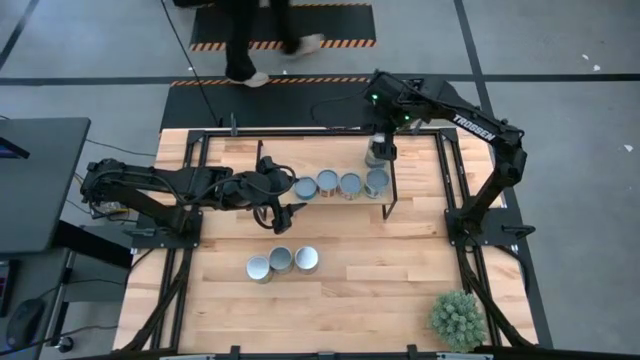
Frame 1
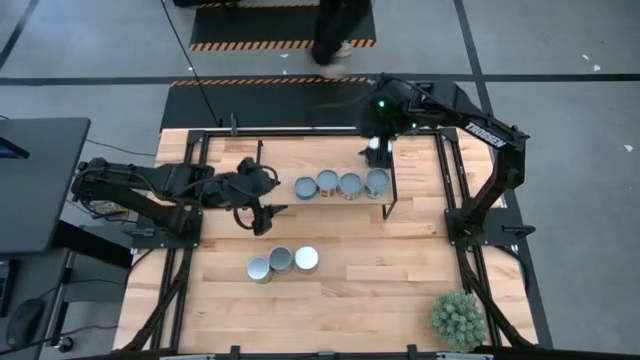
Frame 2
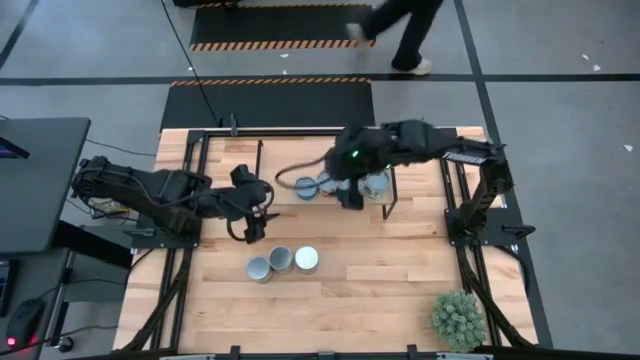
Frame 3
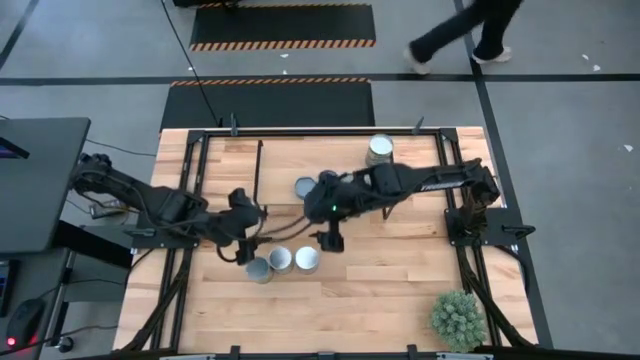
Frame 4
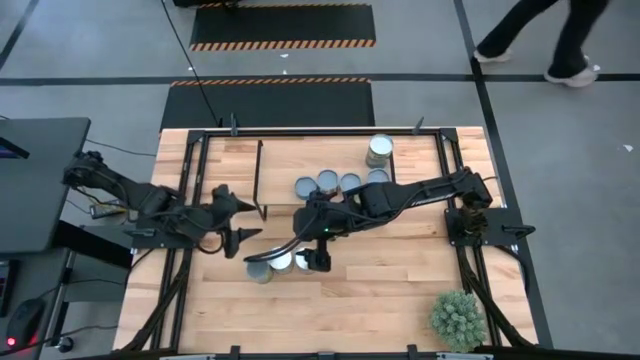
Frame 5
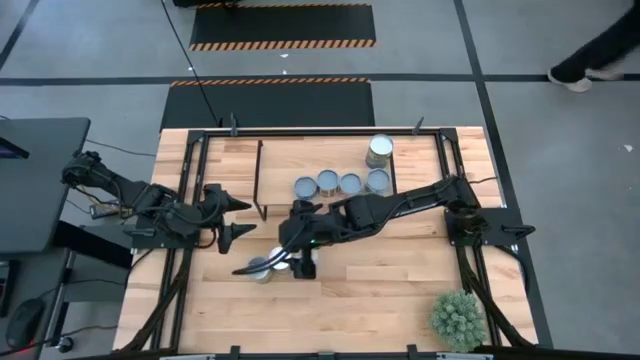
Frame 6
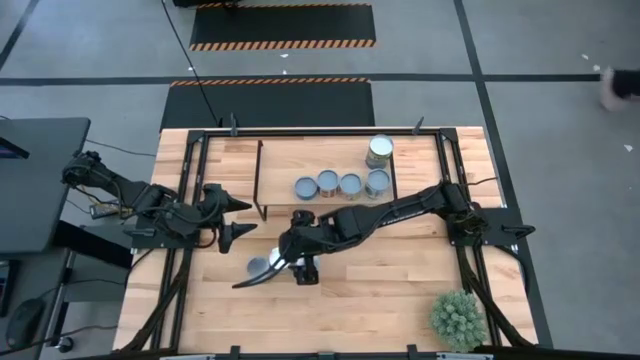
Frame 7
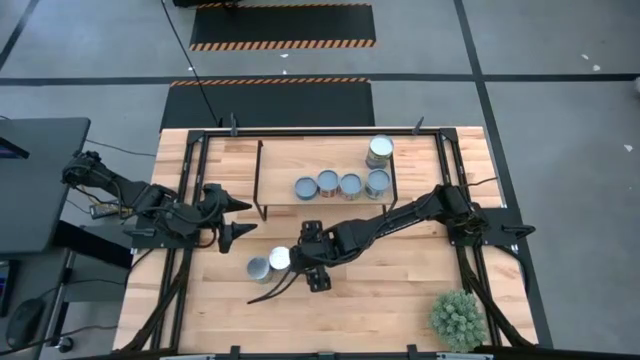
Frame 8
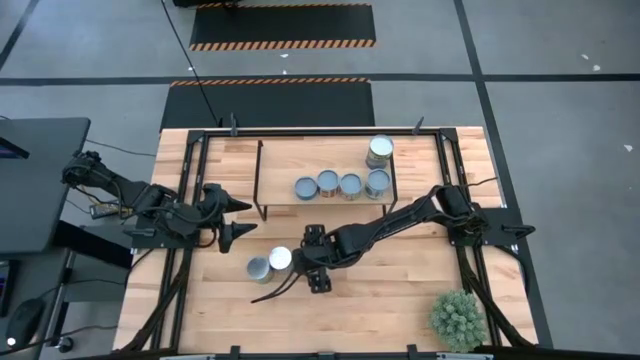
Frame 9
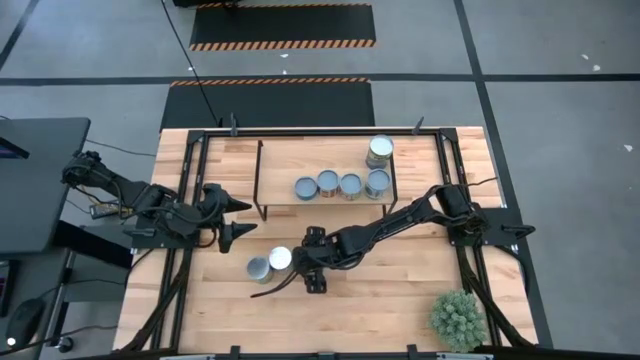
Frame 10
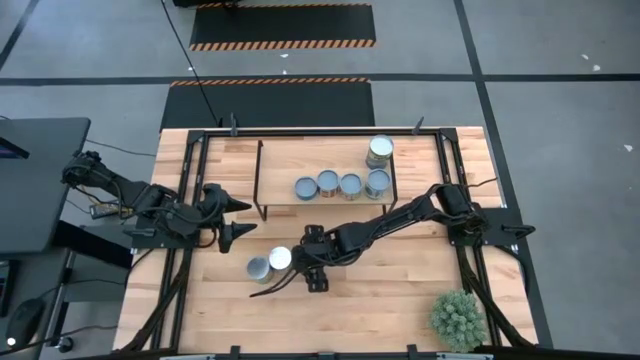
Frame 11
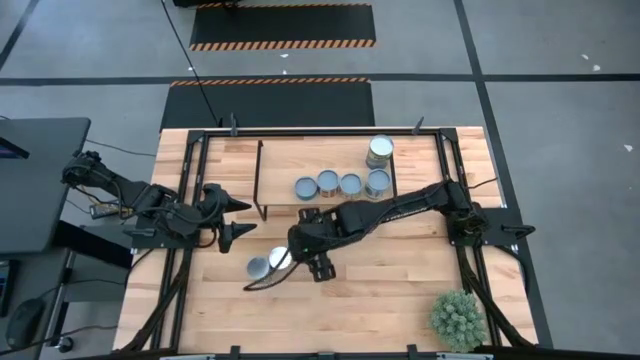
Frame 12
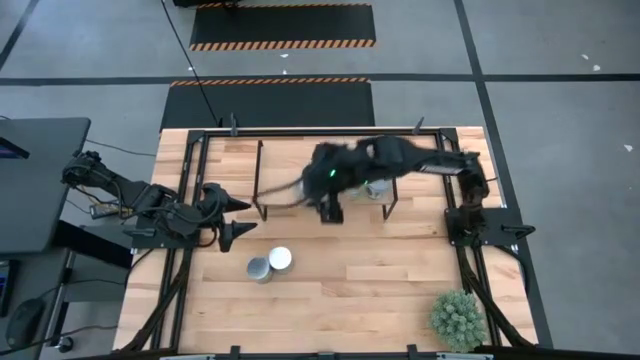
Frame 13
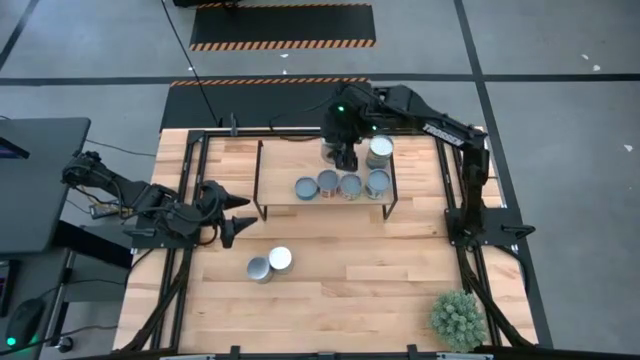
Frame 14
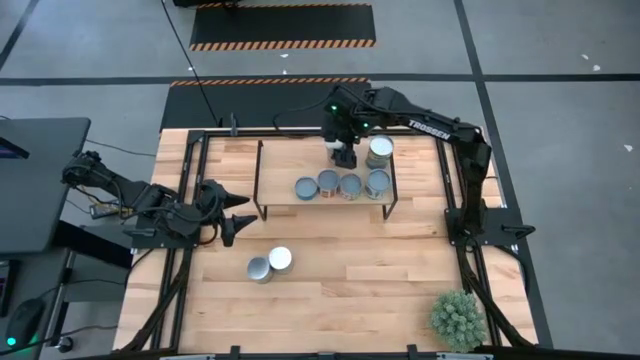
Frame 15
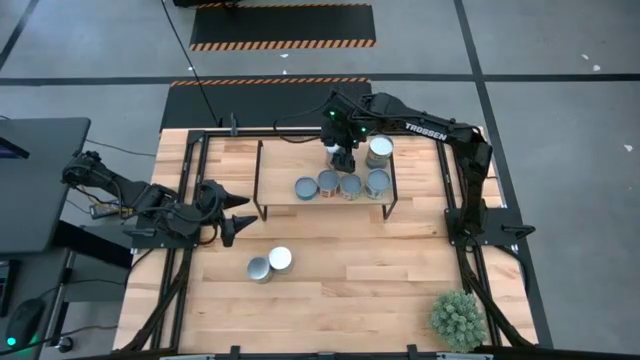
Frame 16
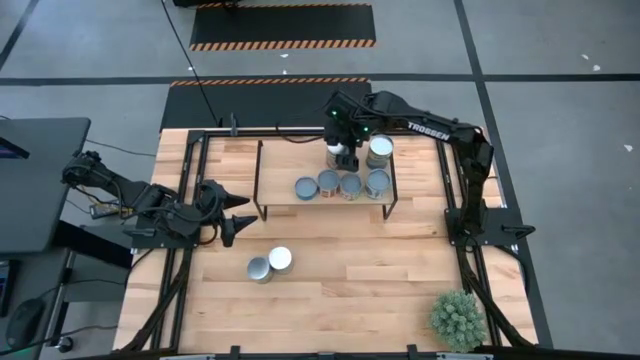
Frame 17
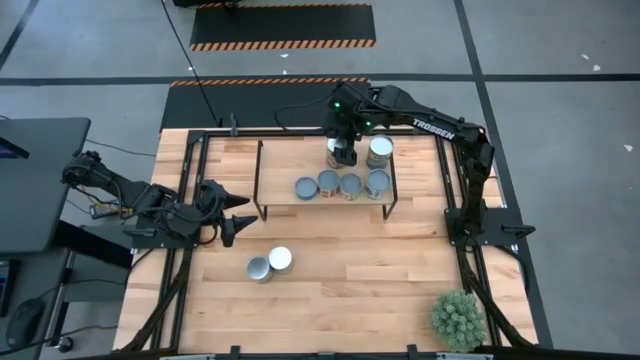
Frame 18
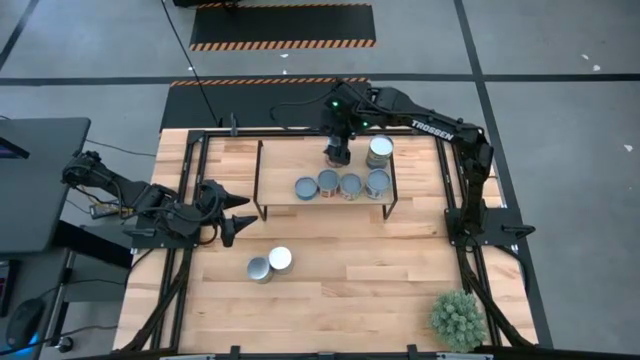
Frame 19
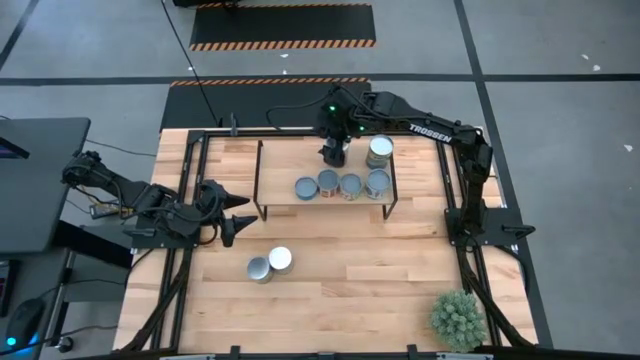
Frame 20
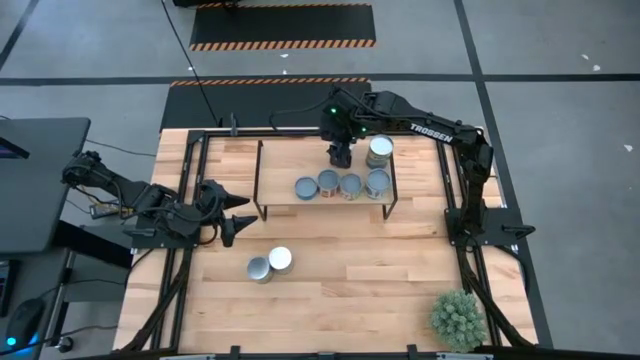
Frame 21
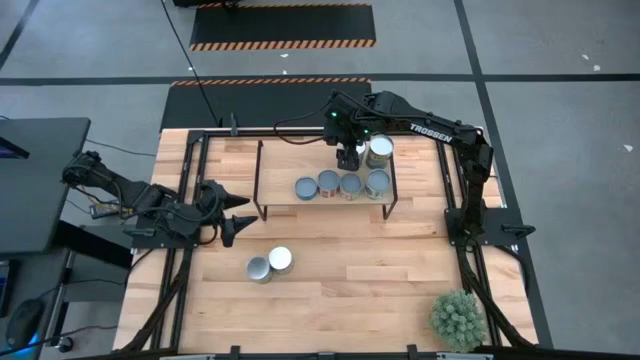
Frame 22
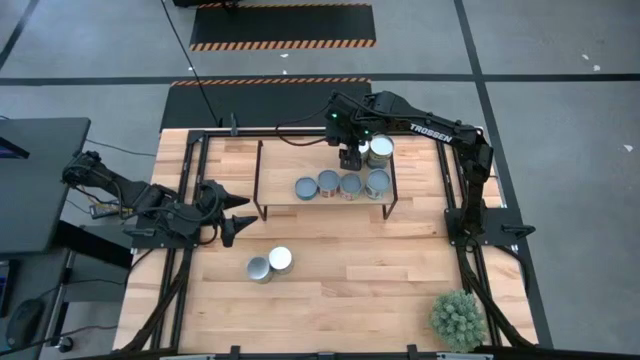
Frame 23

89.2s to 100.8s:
Task: Pick and place cans onto a shelf
Put the canned peaches on the shelf

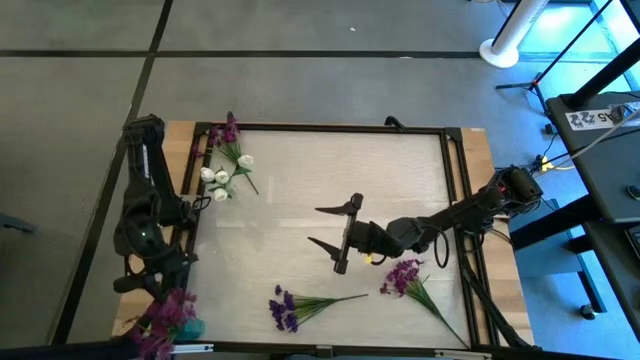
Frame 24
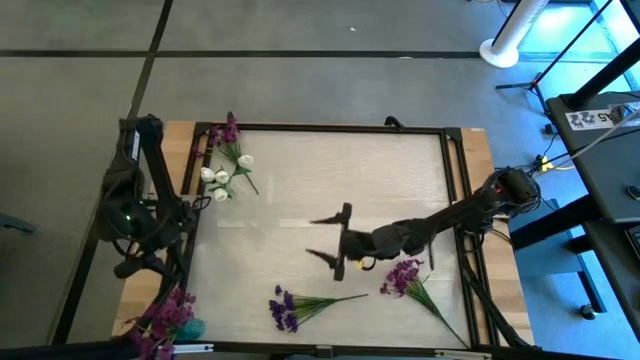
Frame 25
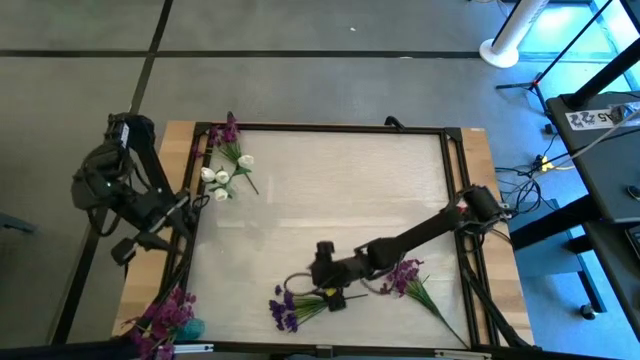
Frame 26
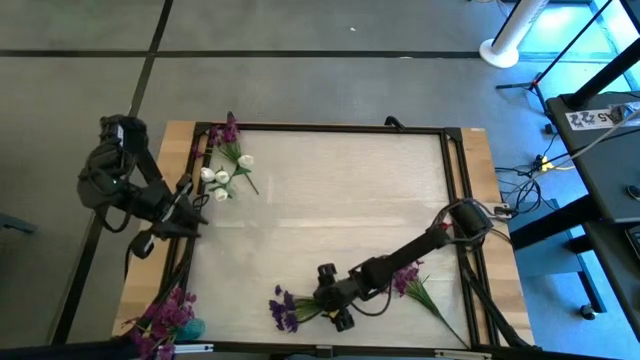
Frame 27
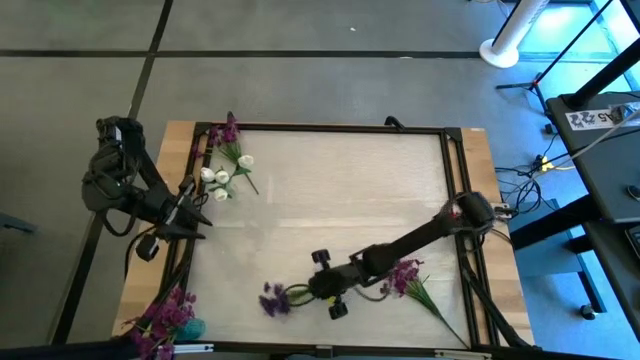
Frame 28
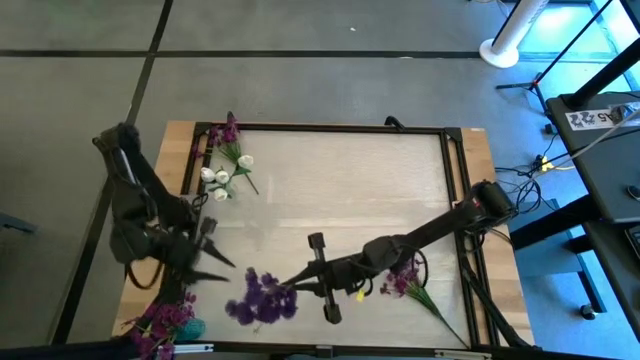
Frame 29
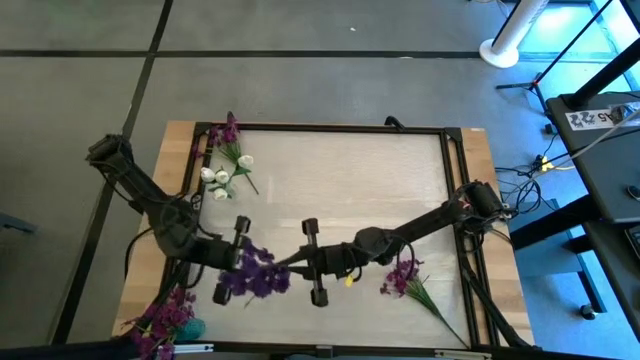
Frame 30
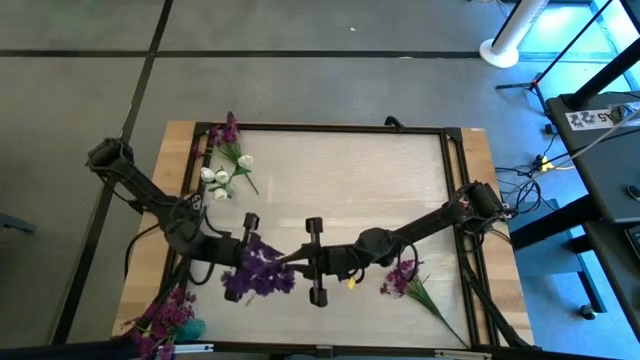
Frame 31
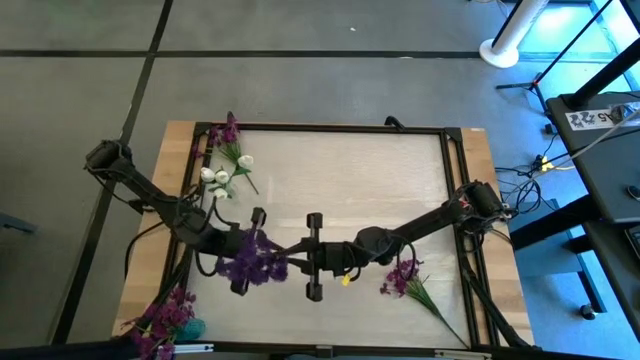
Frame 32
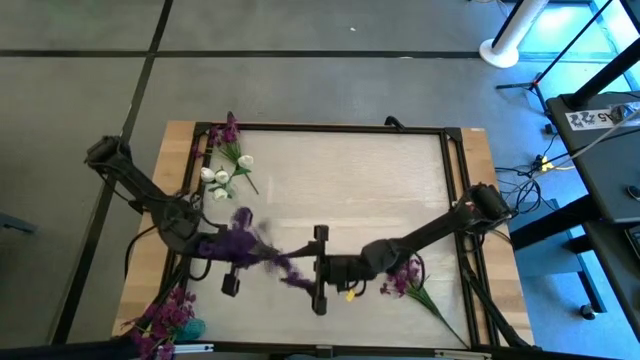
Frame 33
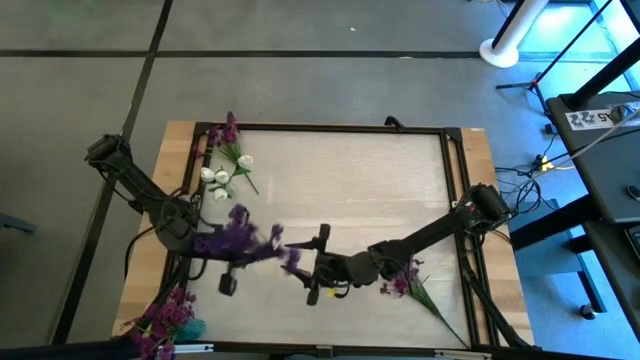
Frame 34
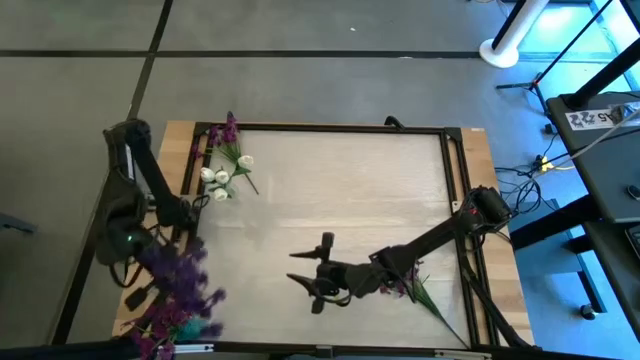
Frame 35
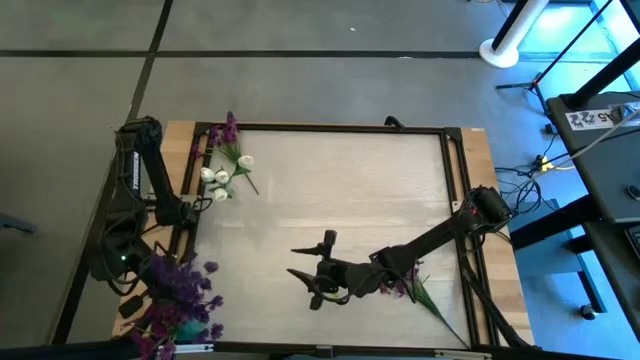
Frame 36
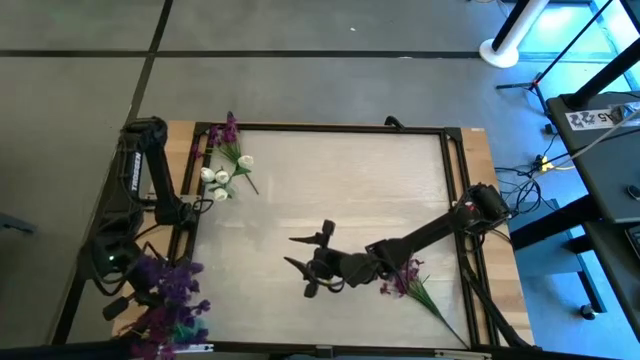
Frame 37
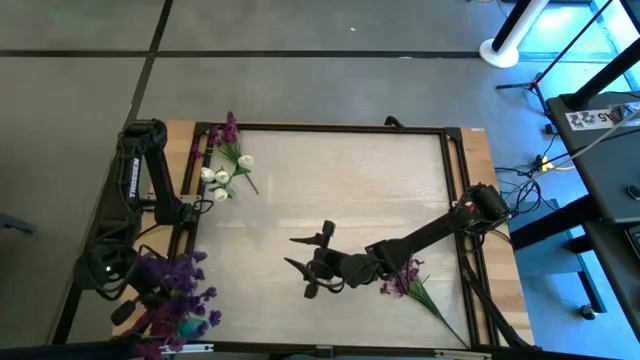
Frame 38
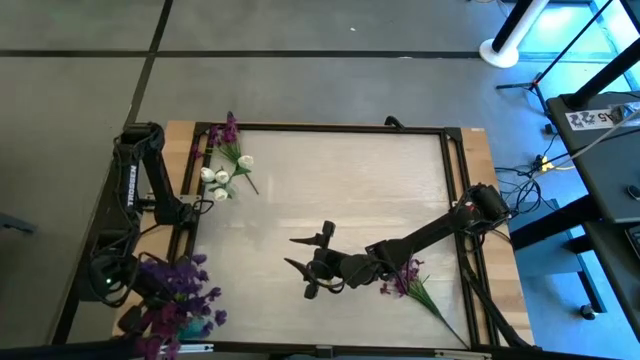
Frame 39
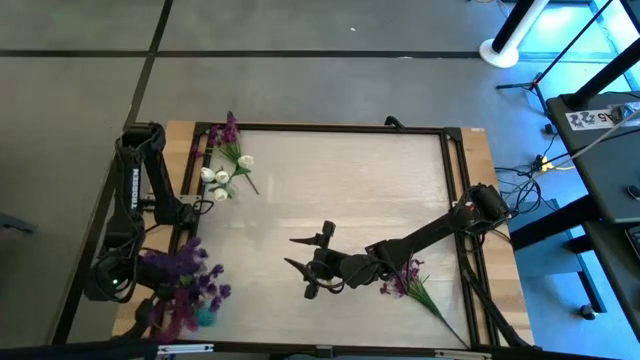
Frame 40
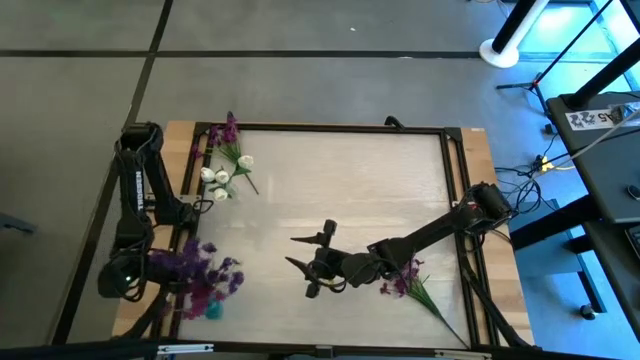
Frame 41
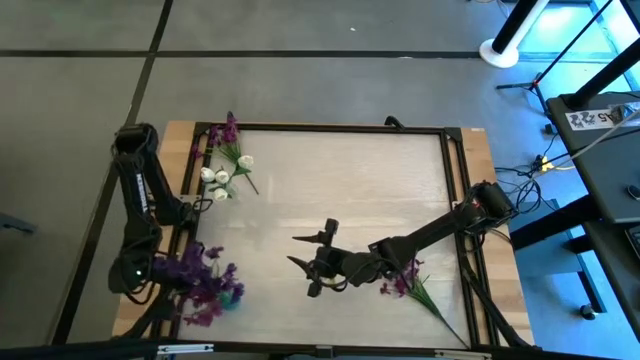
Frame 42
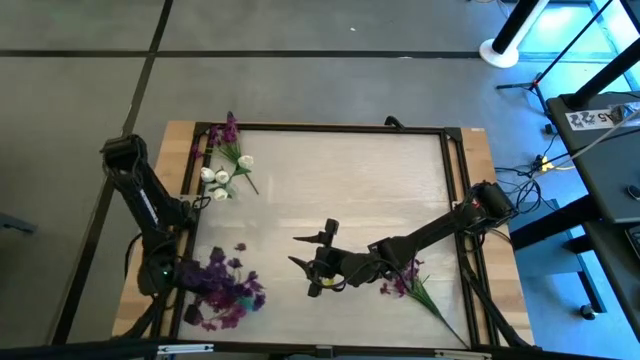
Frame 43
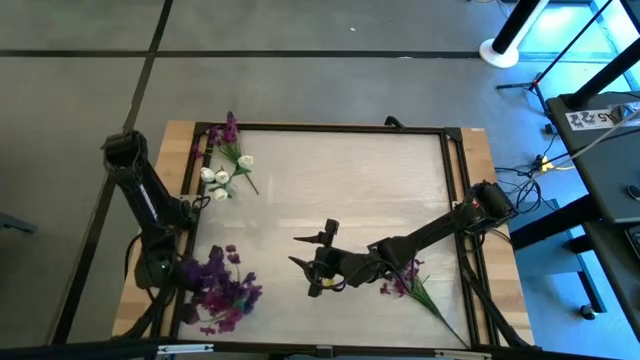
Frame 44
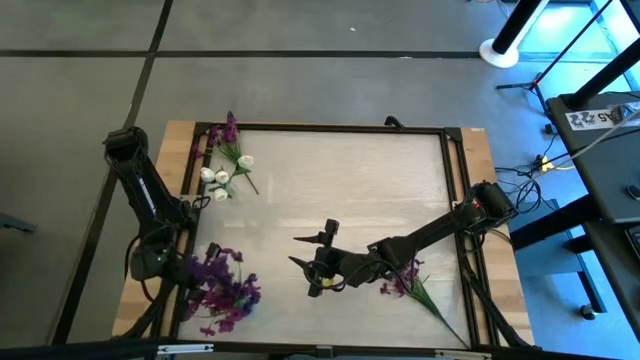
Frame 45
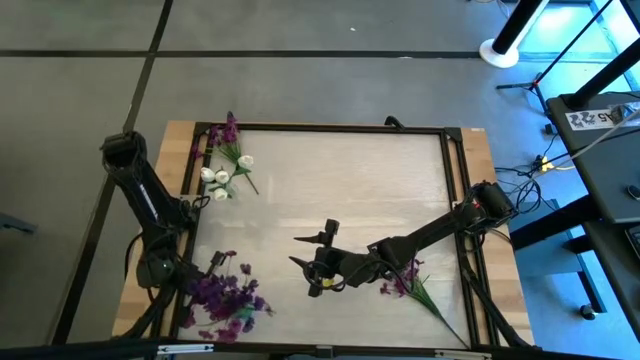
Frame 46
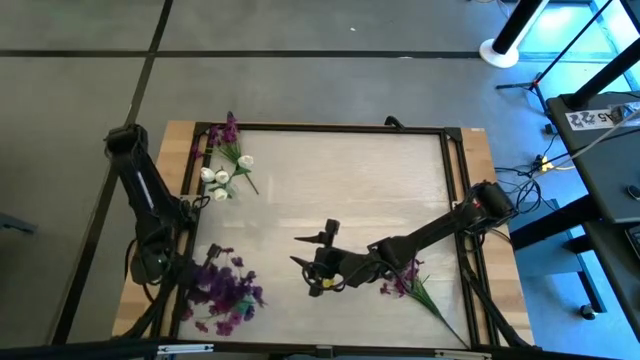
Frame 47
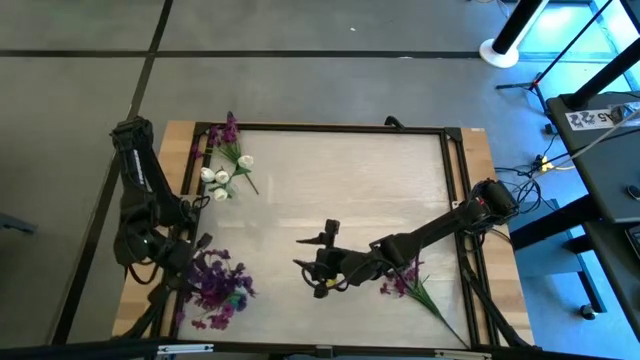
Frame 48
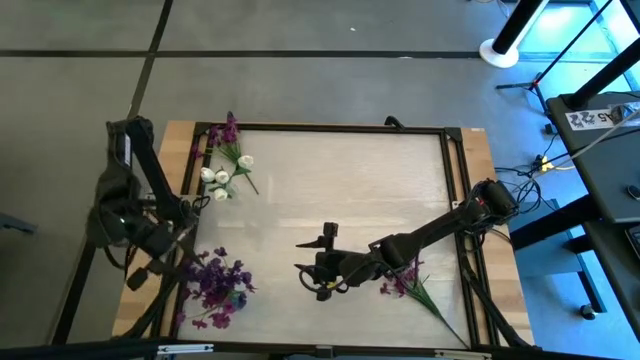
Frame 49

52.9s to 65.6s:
Task: Sort flowers into vase by color
Put the violet flowers into the transparent blue vase
